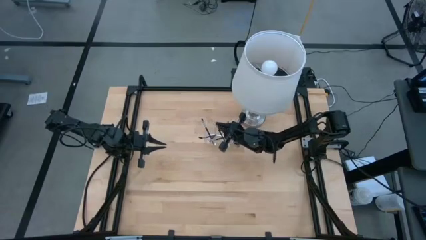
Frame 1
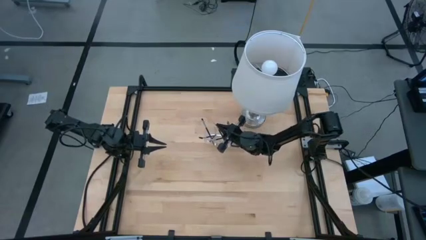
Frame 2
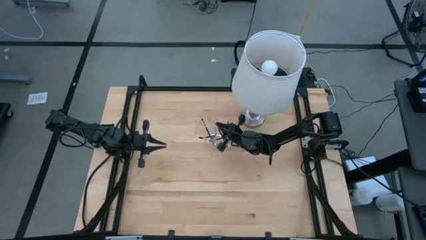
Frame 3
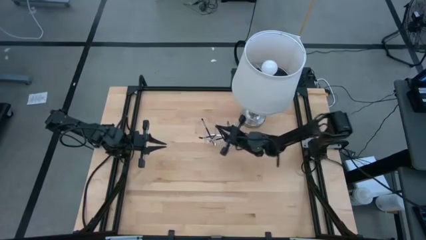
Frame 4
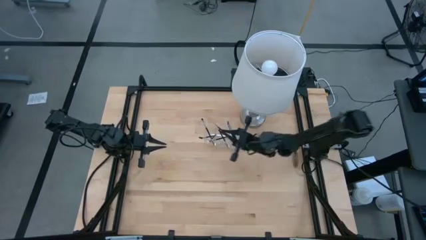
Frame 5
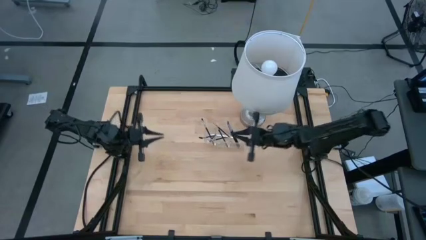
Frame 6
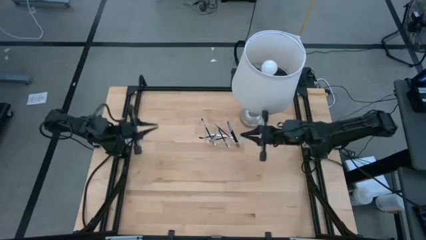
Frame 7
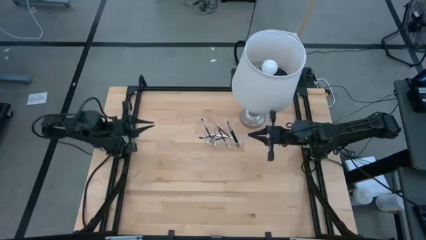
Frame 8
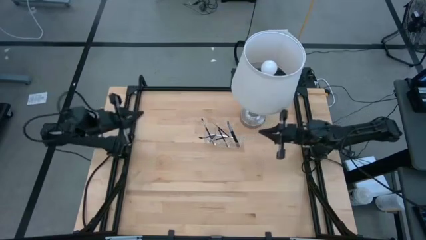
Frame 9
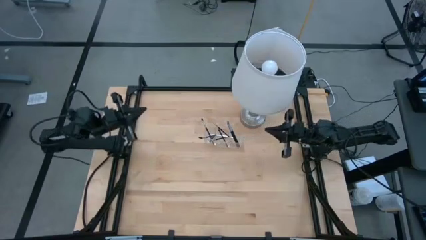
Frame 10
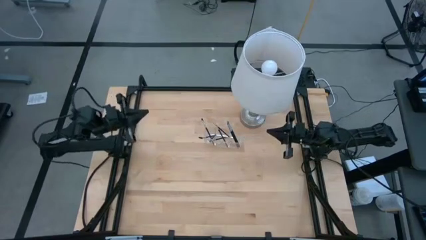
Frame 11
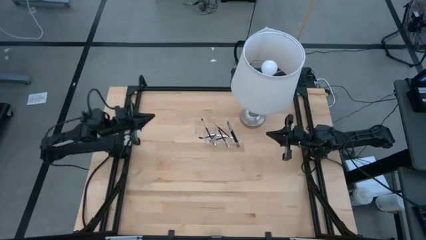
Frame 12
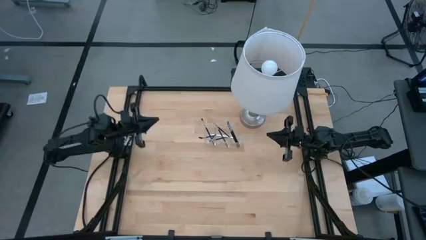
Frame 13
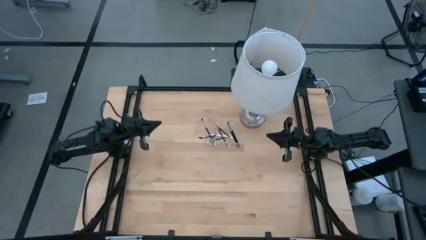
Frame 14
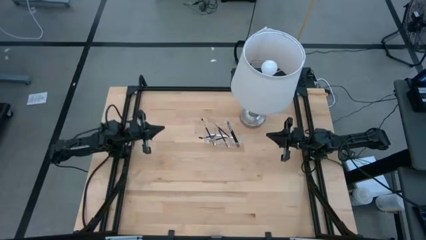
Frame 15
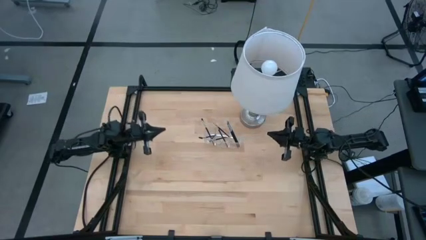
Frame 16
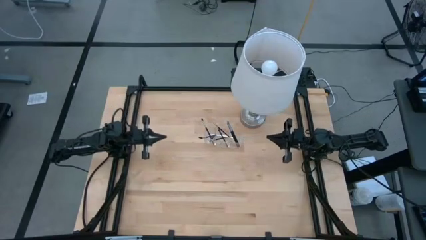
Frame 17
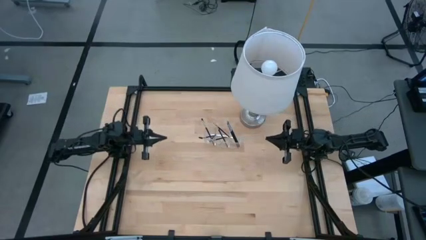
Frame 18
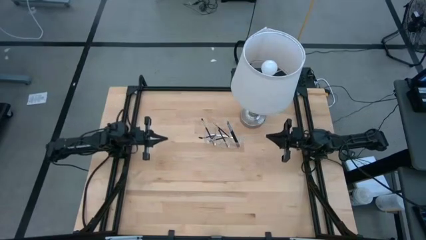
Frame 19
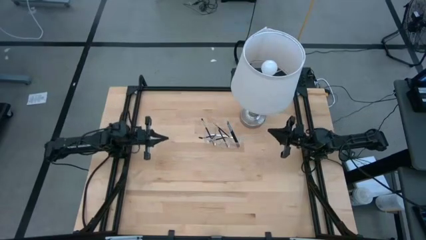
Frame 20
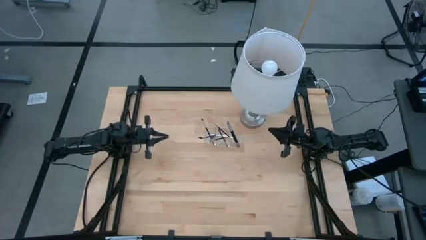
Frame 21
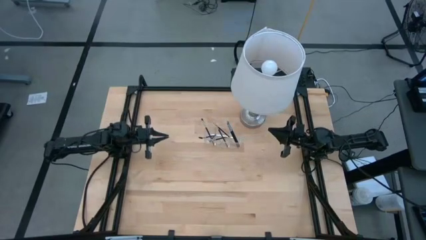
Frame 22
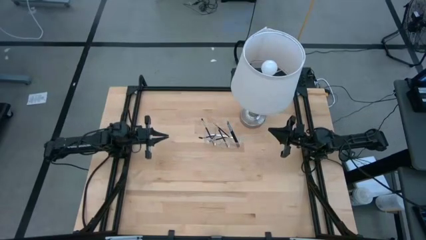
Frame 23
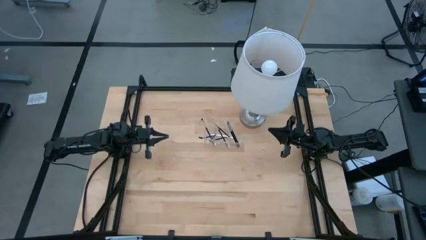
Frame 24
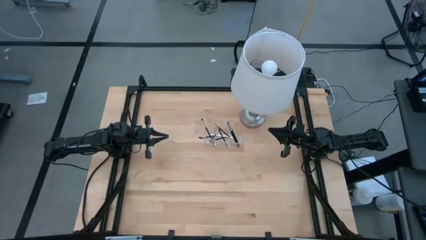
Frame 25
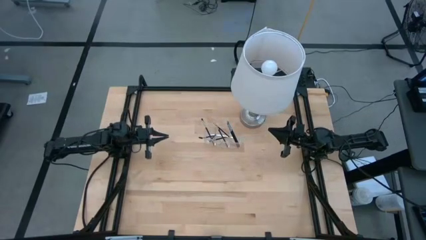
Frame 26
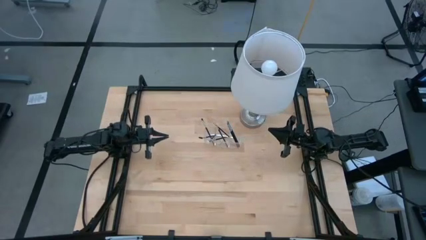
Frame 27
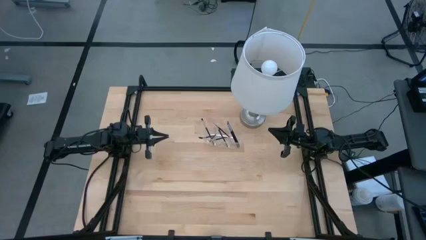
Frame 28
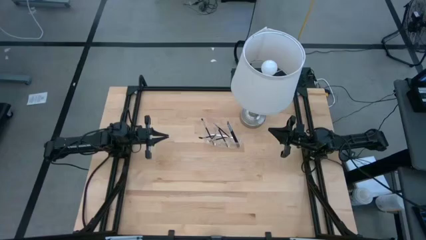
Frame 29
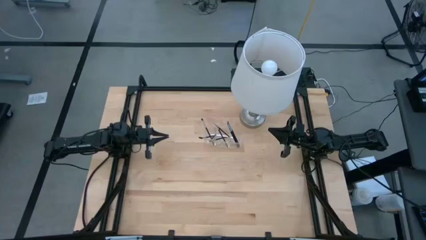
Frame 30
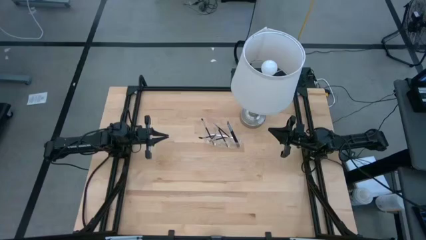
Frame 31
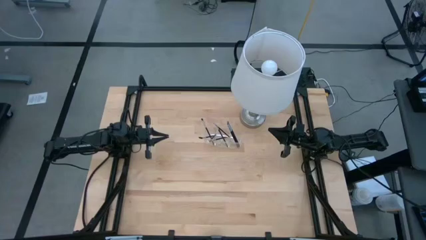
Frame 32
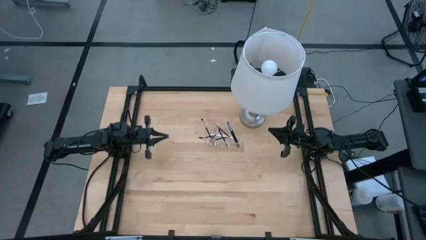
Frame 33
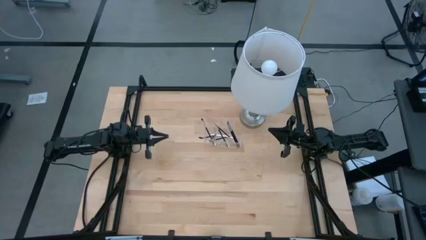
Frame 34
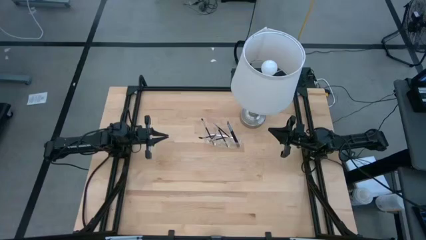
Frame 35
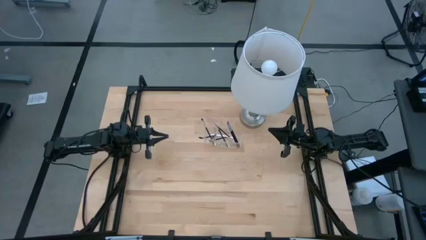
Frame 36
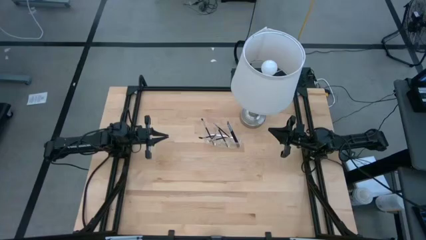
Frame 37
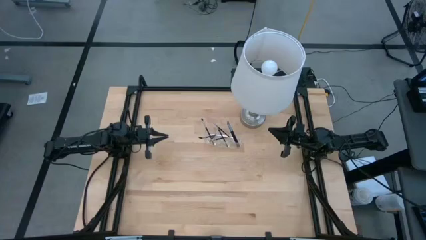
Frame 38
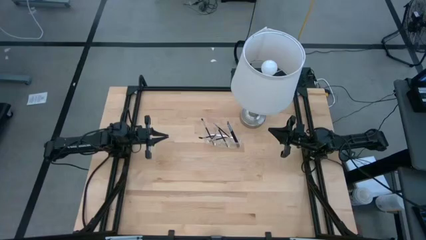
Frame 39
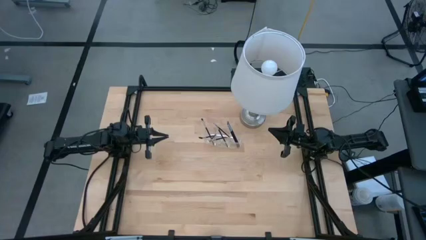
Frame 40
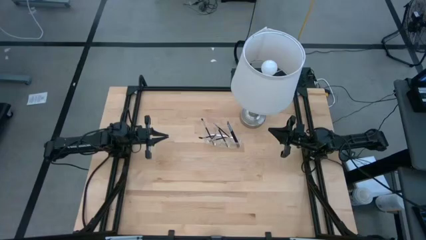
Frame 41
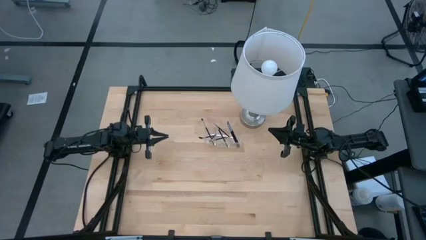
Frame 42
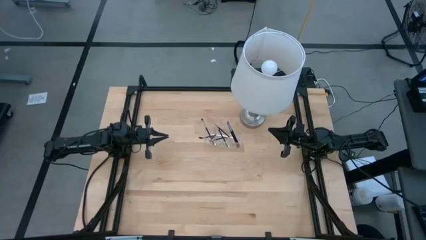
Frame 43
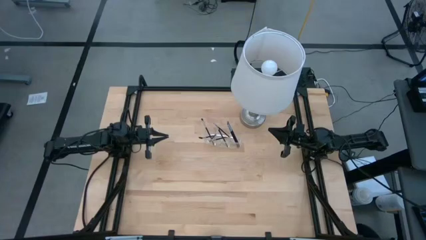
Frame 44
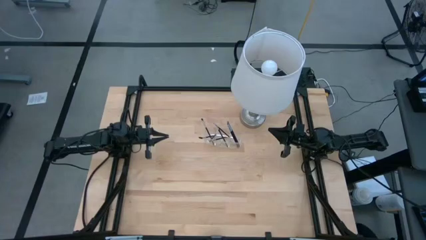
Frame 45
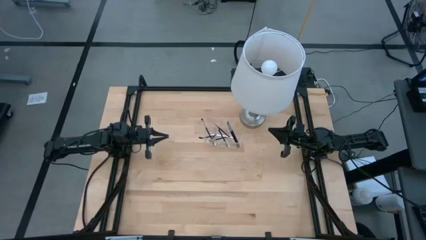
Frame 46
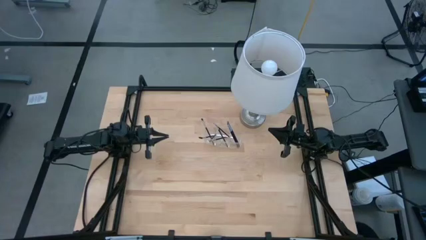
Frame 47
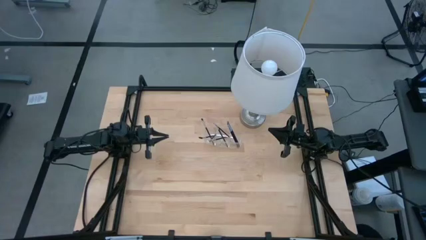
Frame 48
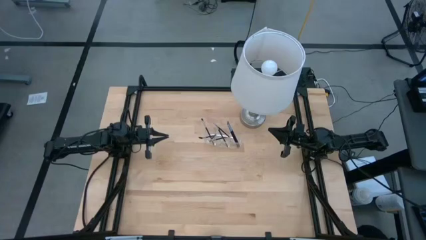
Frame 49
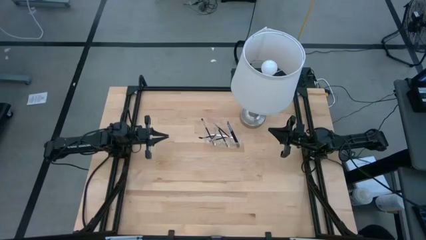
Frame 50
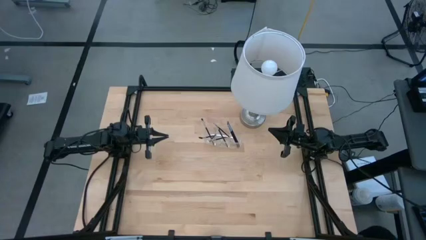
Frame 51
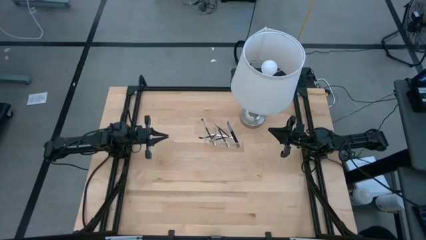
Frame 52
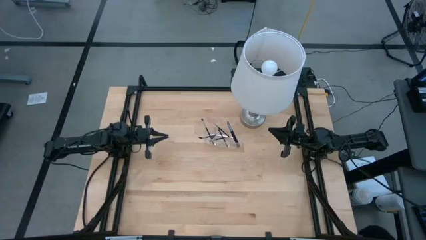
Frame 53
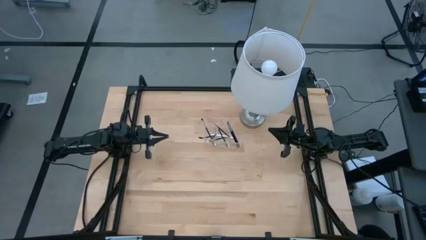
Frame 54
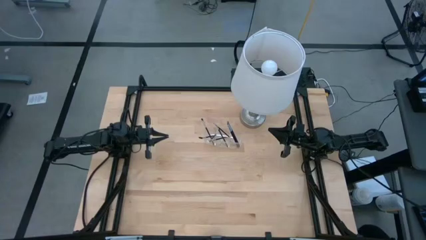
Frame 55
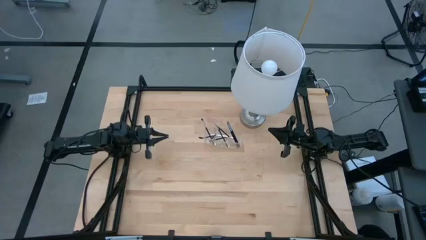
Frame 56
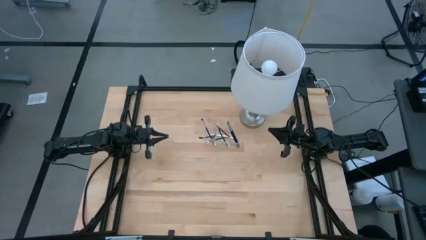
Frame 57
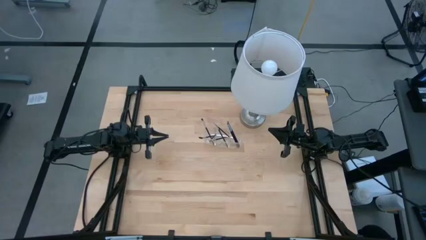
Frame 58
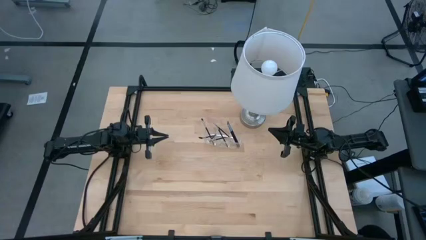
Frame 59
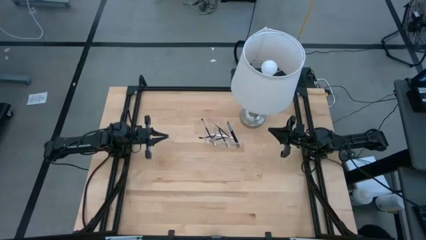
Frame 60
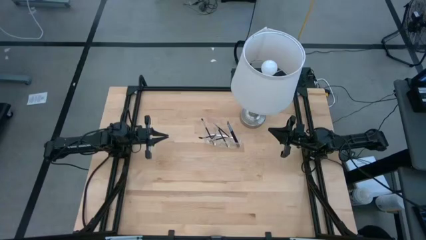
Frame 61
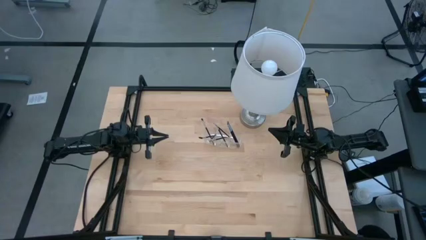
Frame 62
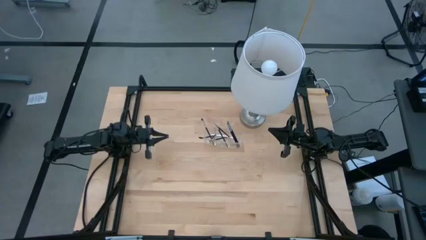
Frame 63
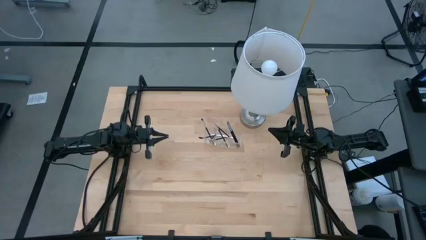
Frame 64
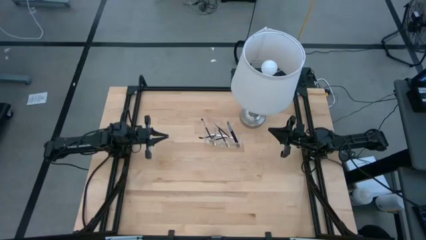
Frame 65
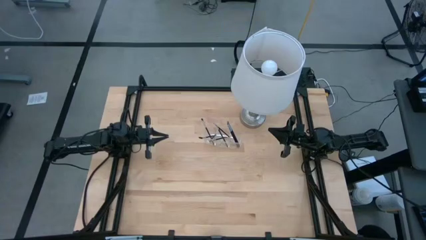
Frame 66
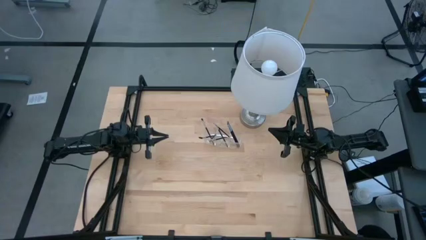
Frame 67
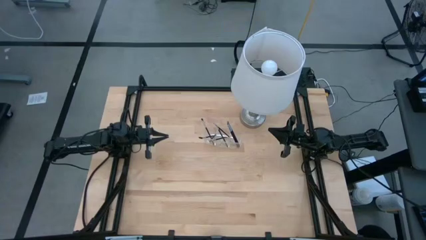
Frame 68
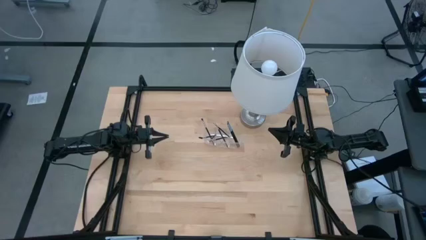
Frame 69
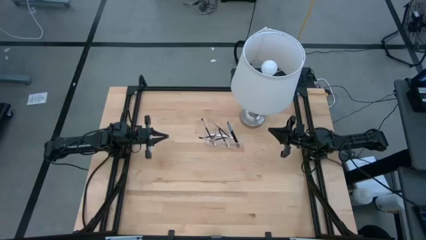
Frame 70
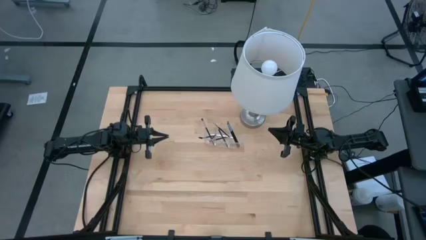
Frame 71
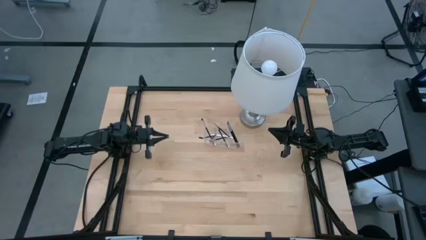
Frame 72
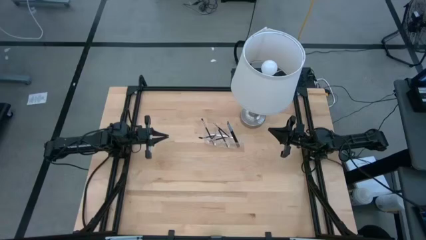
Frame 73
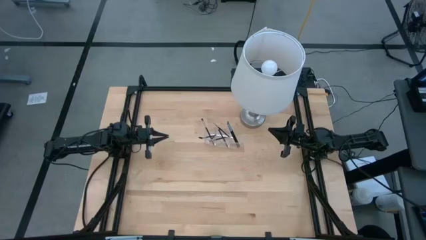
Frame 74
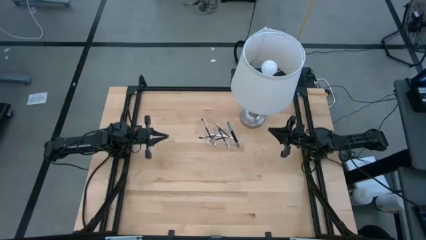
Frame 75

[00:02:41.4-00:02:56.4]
Task: Pick & Place Makeup Brushes
Return to Home Position
